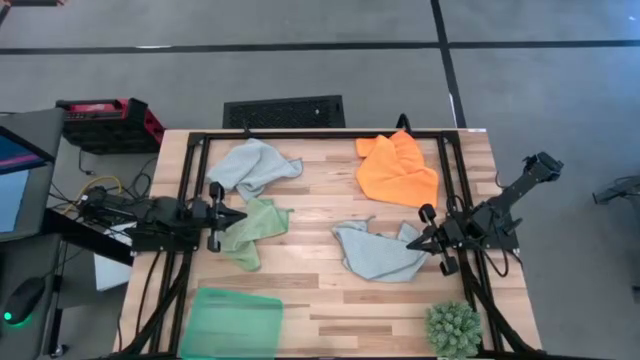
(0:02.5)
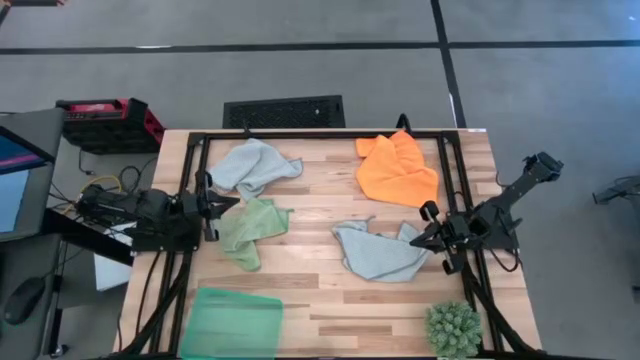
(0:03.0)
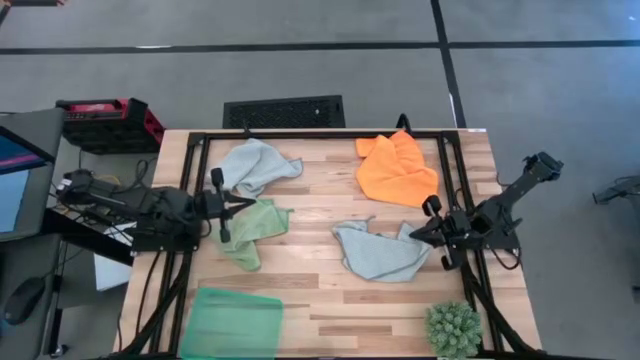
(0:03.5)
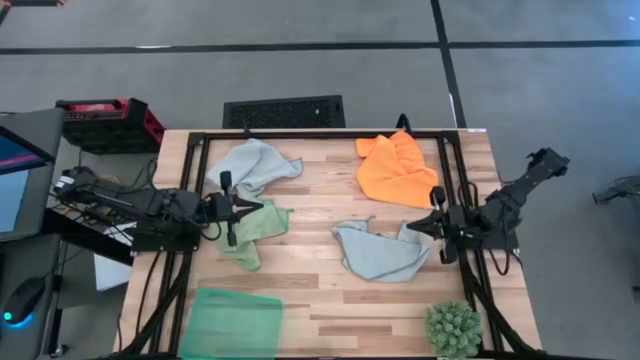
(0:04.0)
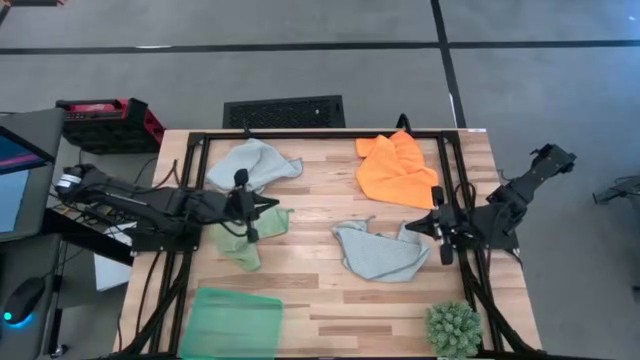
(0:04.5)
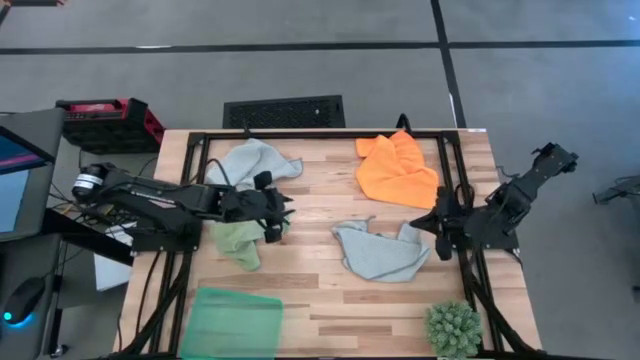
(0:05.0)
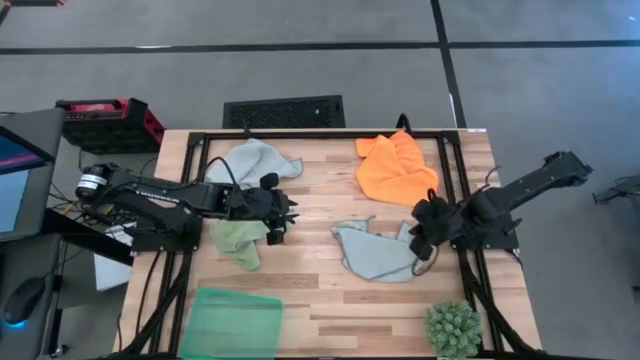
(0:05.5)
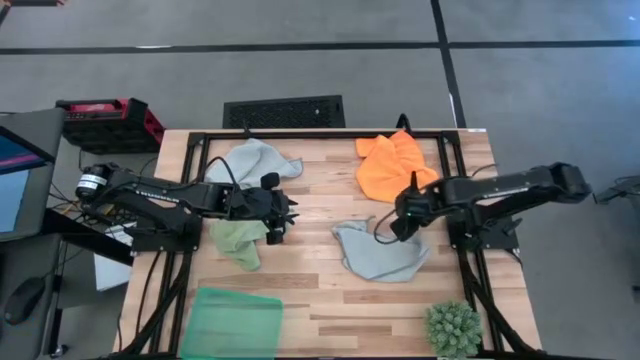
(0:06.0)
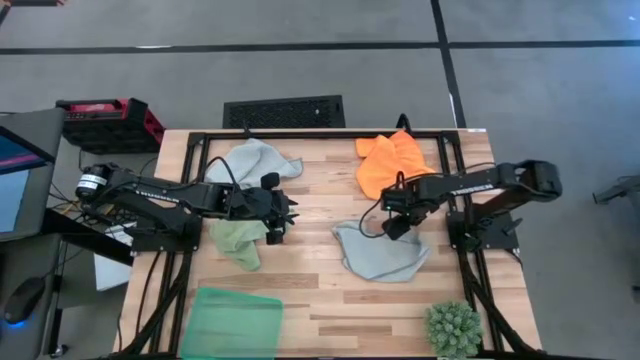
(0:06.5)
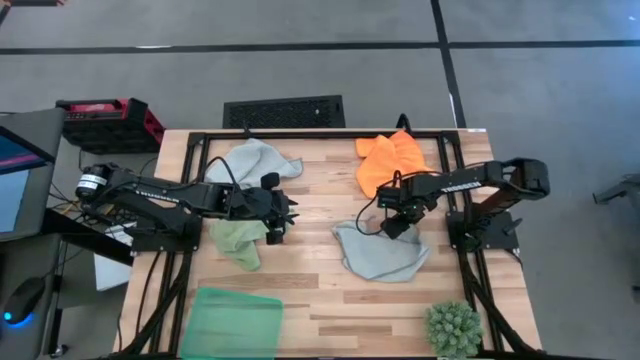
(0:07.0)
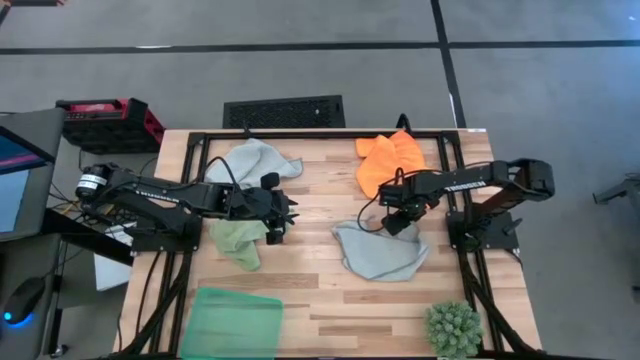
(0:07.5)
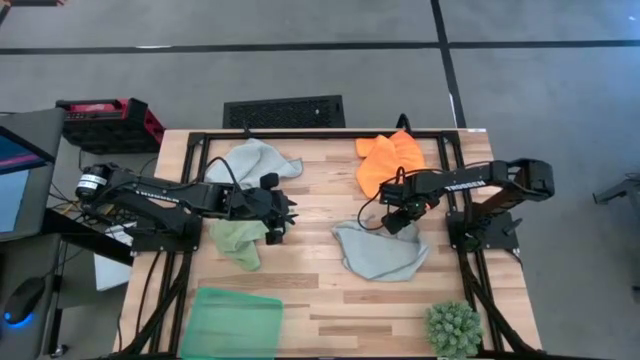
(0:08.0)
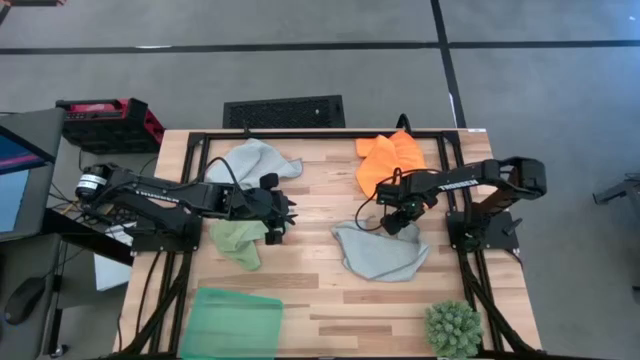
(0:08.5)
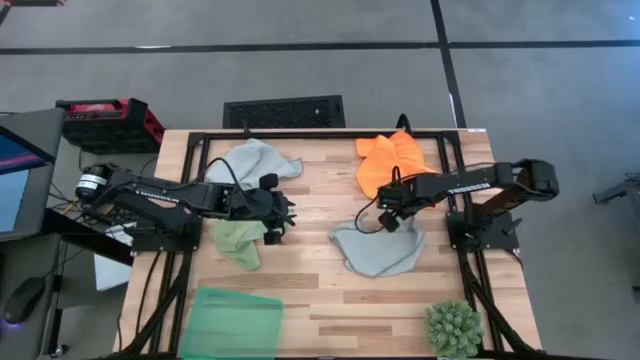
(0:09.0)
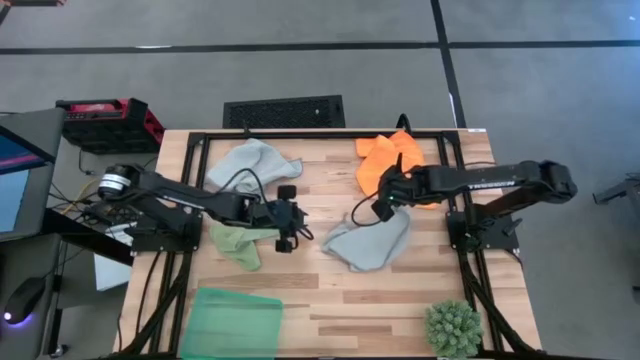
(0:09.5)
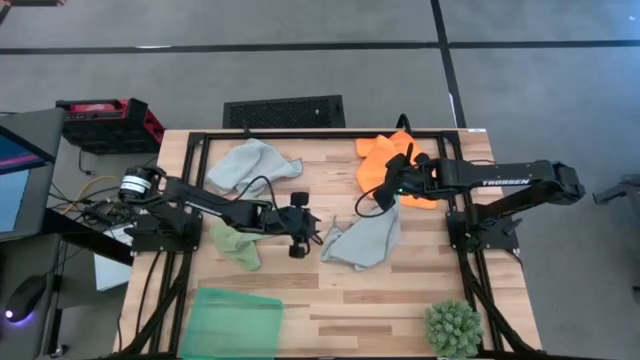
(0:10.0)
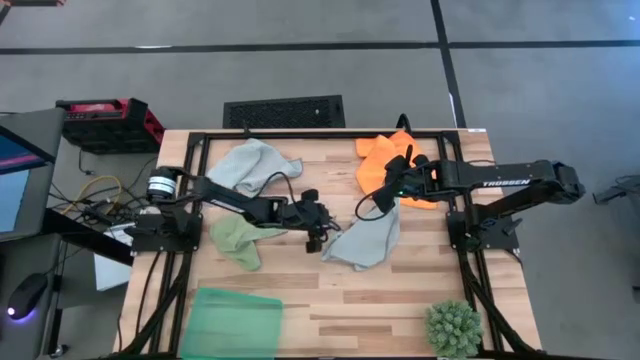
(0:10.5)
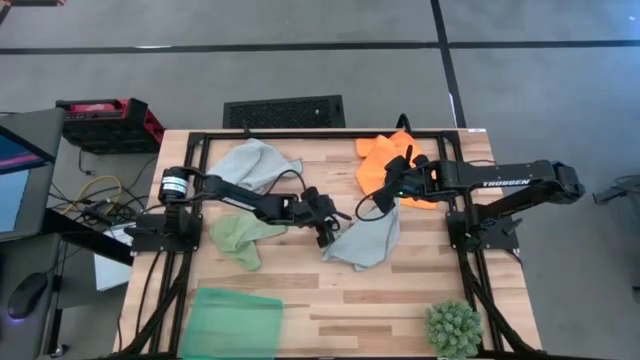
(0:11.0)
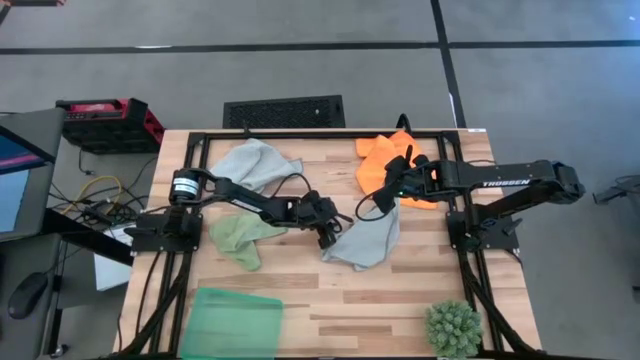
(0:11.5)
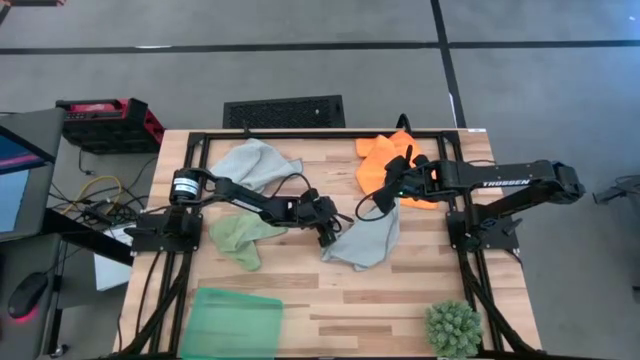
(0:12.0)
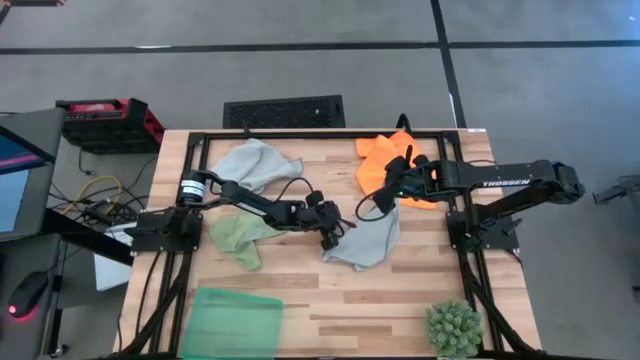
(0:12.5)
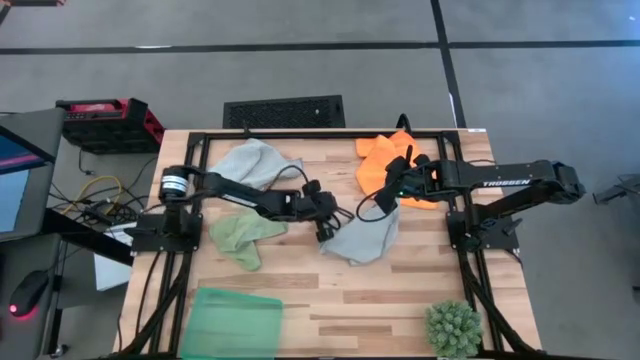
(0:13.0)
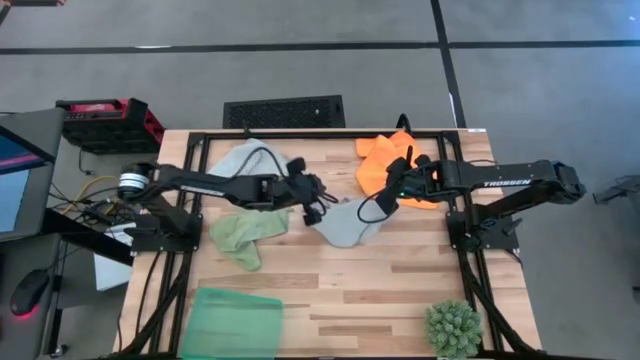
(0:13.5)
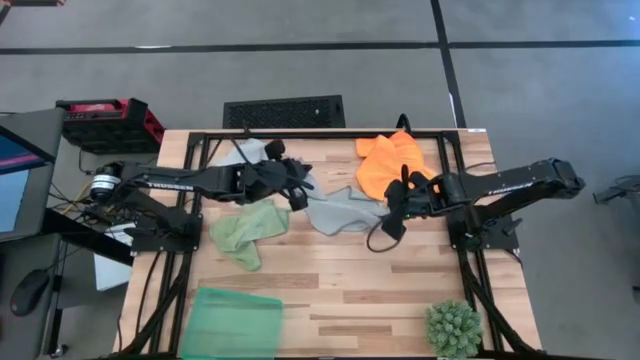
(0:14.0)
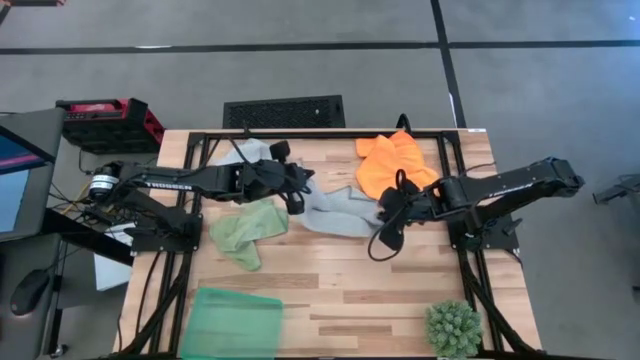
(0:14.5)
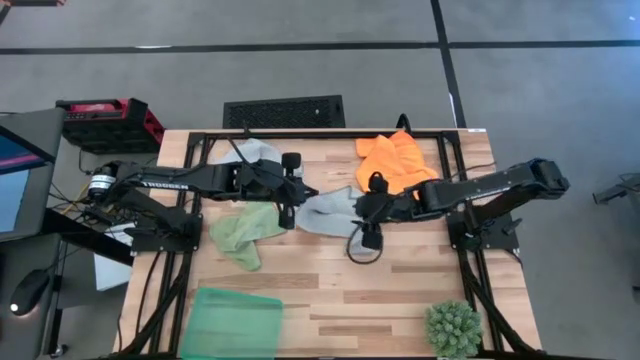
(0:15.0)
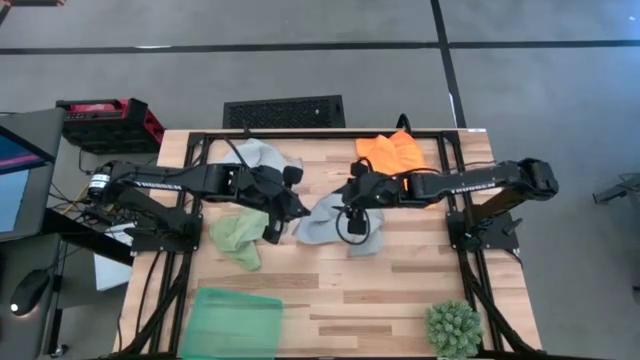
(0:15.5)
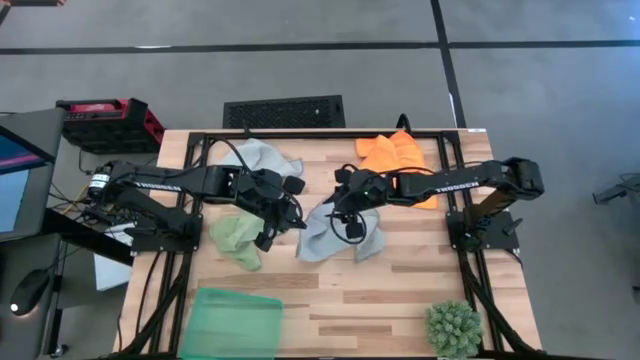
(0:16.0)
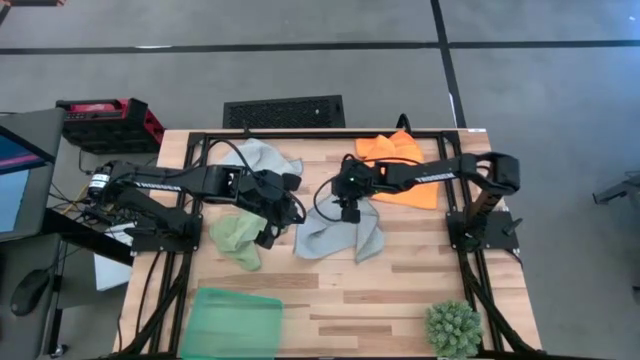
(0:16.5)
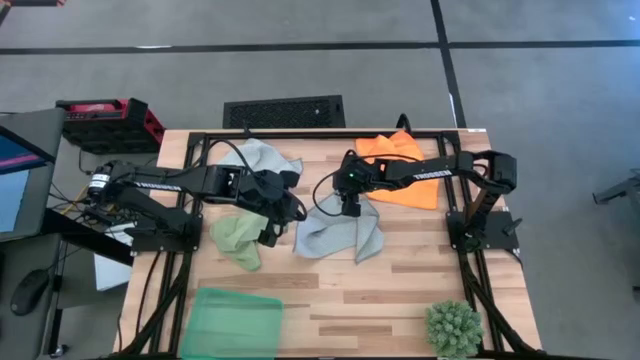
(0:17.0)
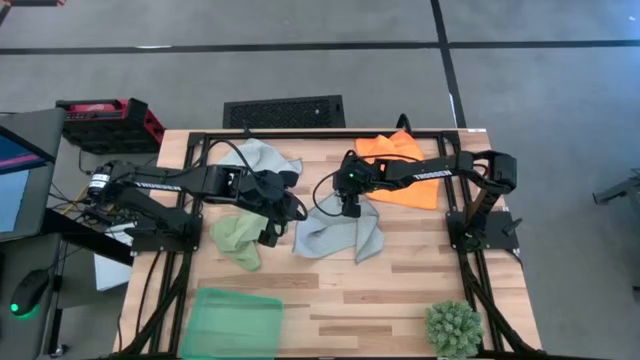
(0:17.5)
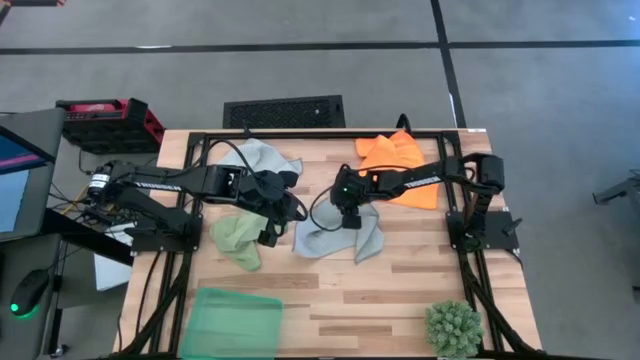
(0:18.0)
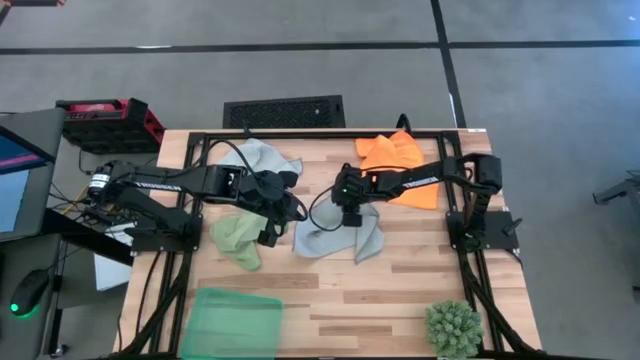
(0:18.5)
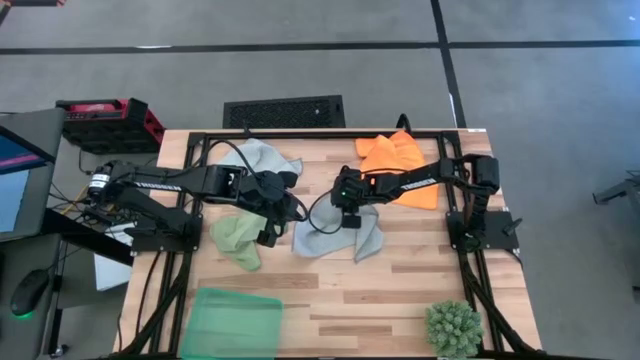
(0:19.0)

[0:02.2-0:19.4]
Task: Fold microfiber towels
Fold the bottom gray microfiber cloth

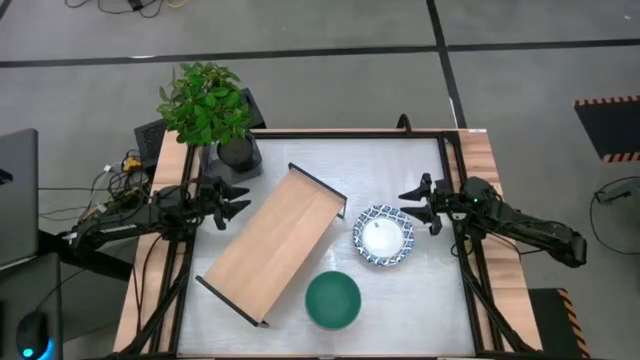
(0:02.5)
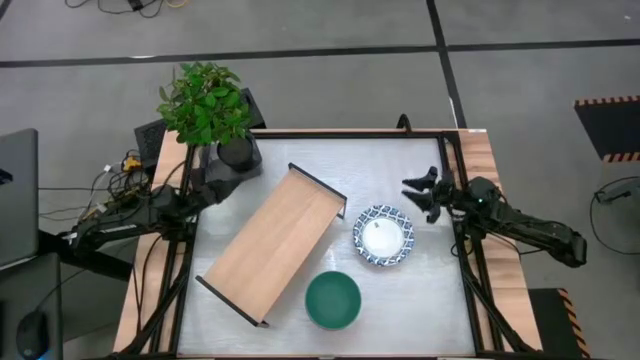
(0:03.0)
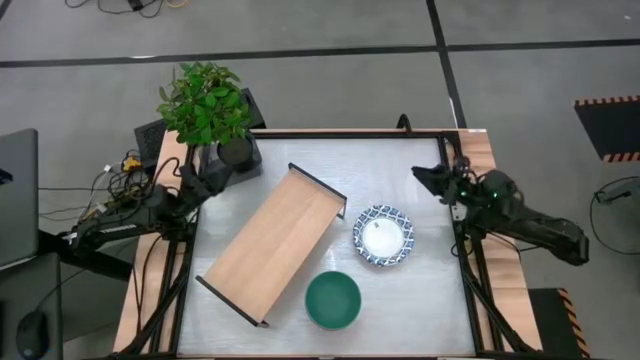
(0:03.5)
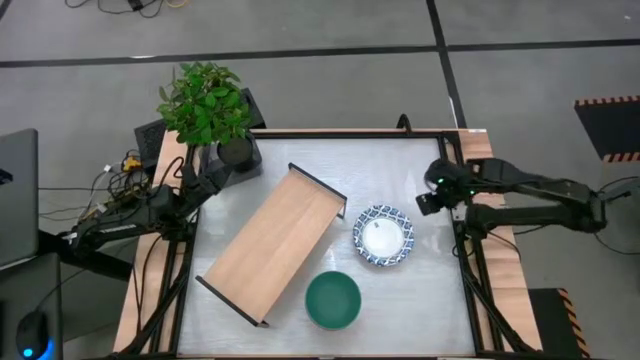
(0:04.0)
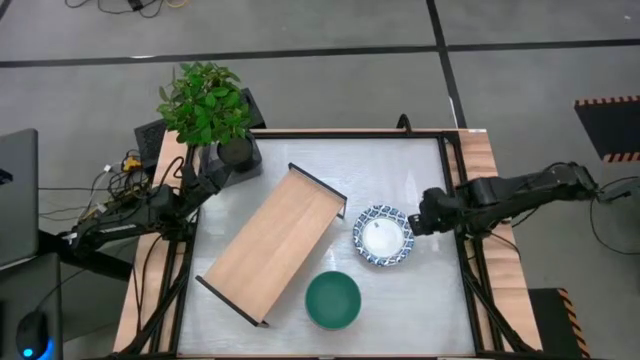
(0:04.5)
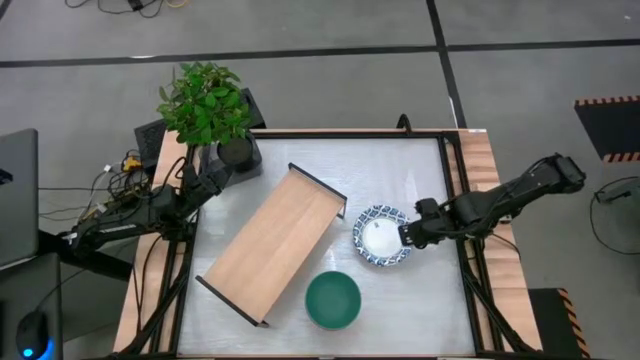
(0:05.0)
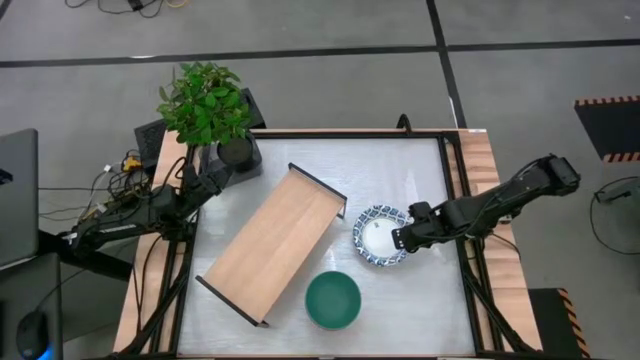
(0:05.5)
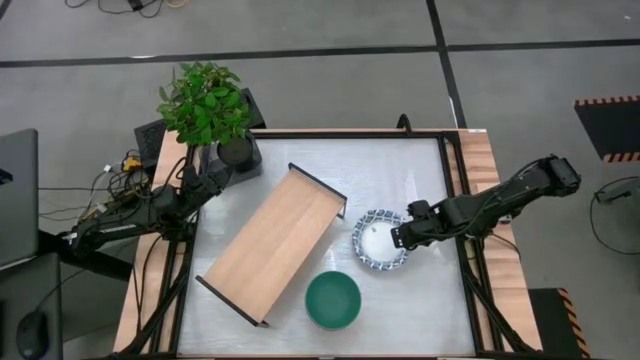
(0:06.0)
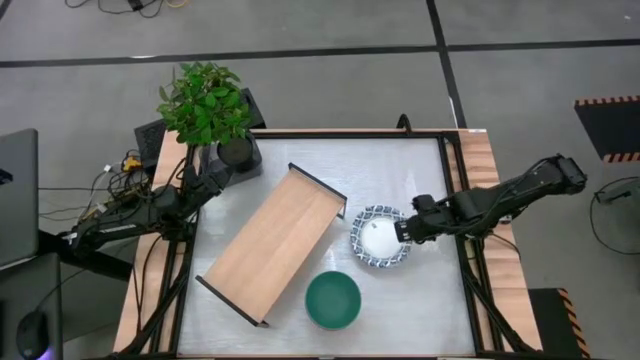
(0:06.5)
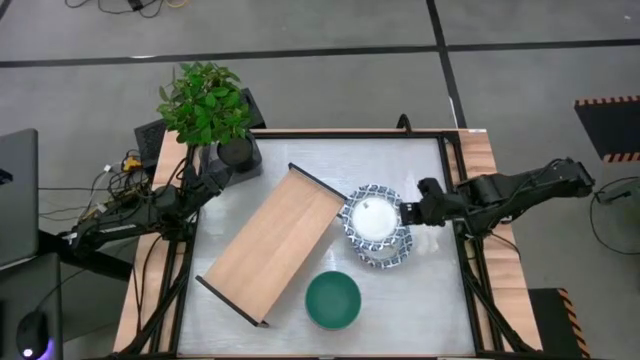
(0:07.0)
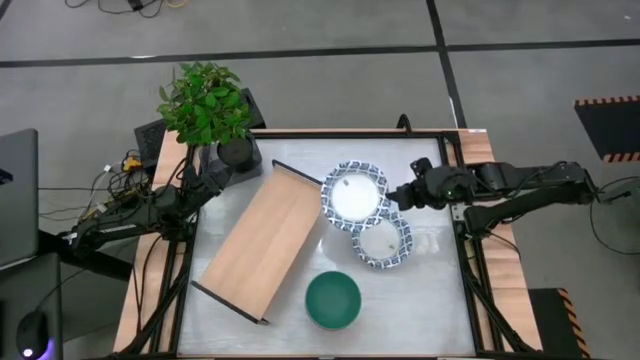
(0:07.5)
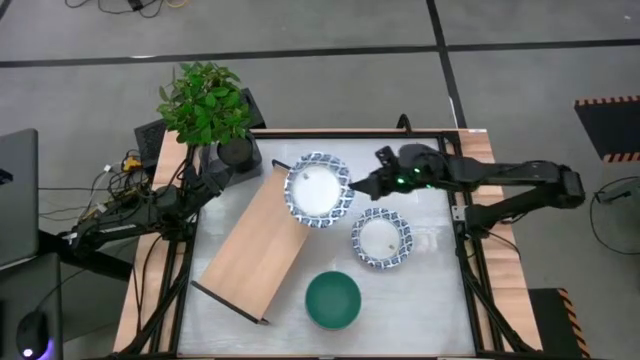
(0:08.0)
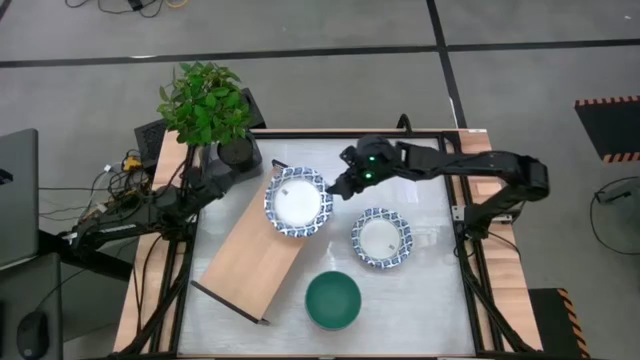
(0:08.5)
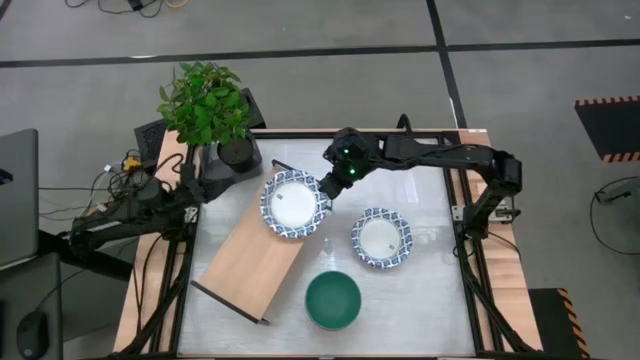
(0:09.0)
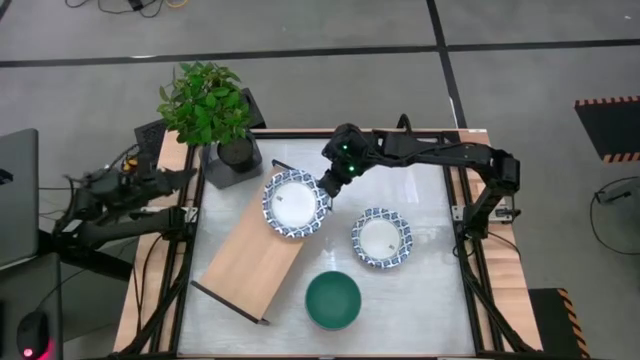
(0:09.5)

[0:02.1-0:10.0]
Task: Place and stack bowls onto a shelf
Put the white patterned bowl on the shelf
